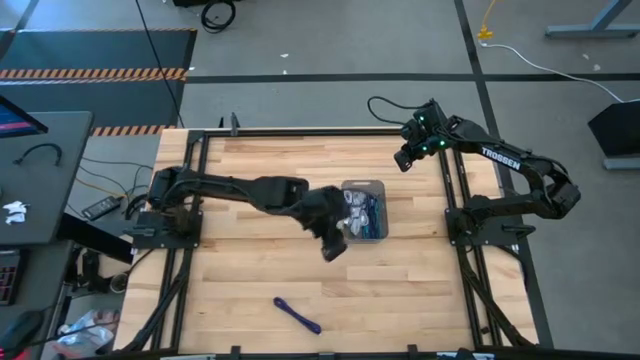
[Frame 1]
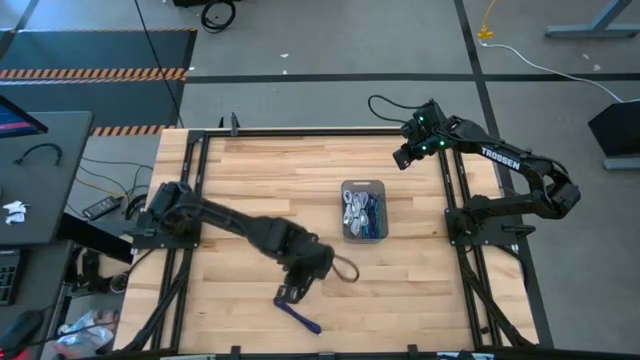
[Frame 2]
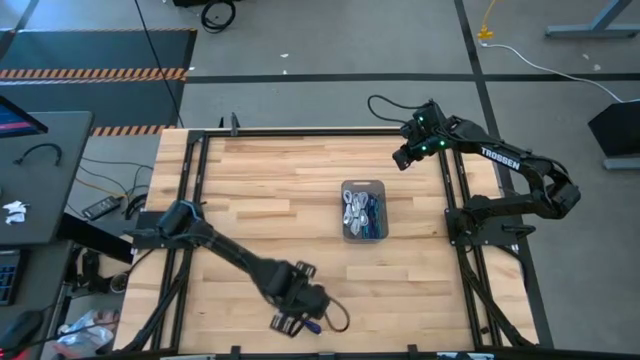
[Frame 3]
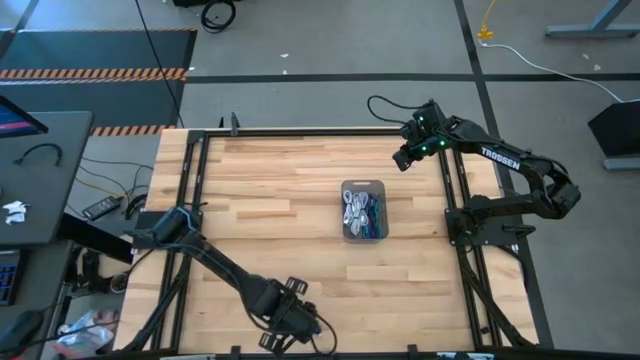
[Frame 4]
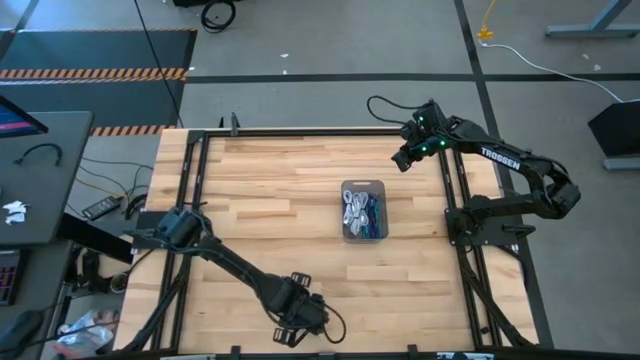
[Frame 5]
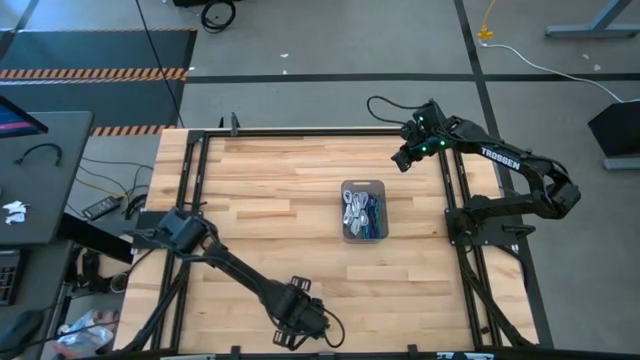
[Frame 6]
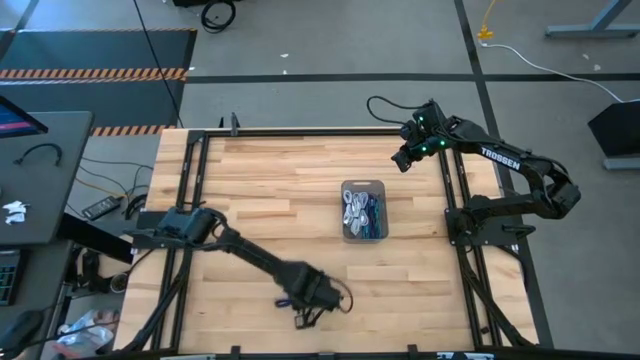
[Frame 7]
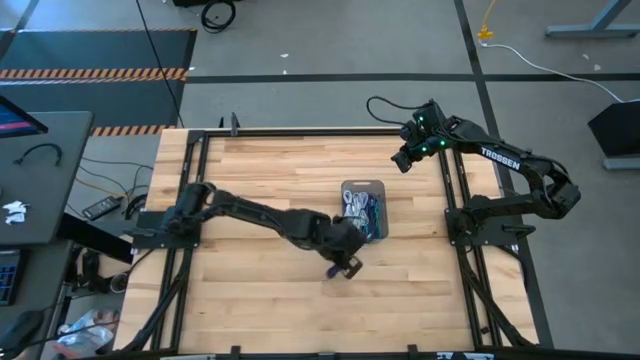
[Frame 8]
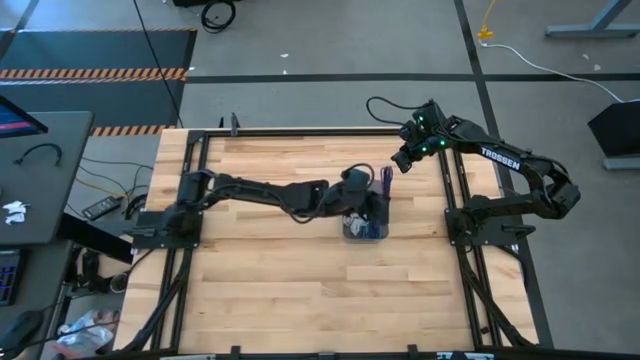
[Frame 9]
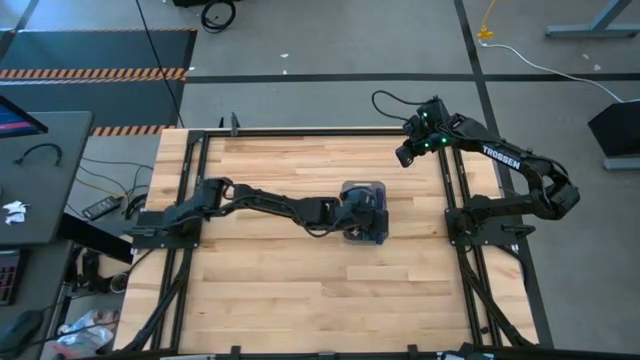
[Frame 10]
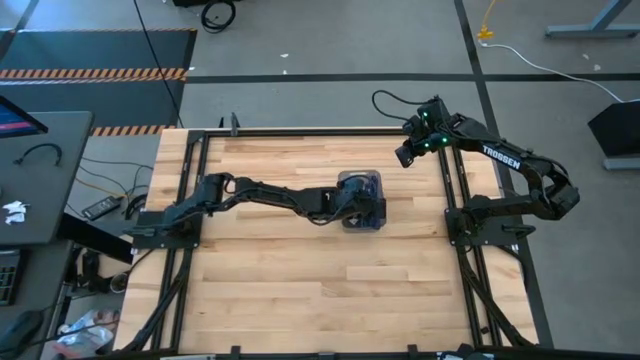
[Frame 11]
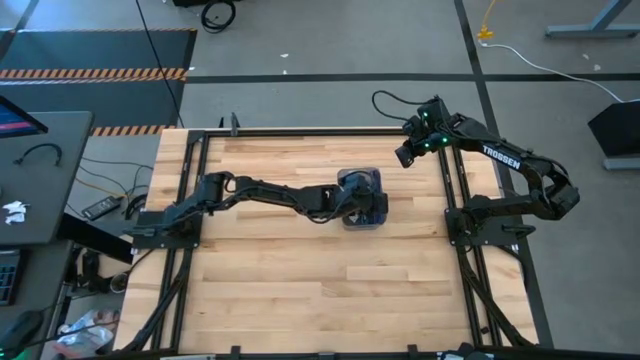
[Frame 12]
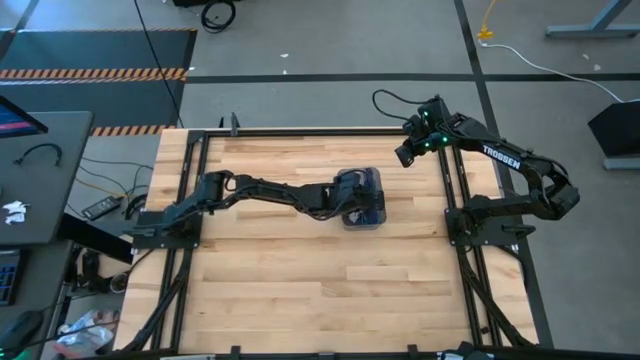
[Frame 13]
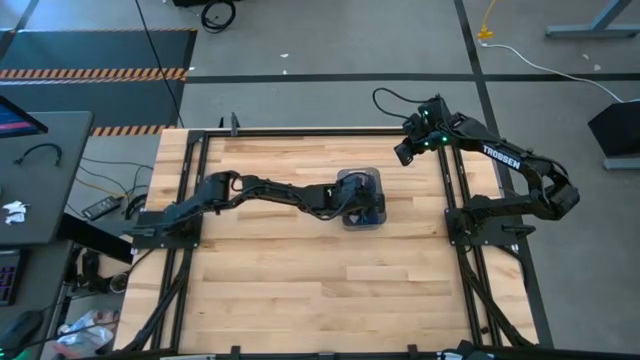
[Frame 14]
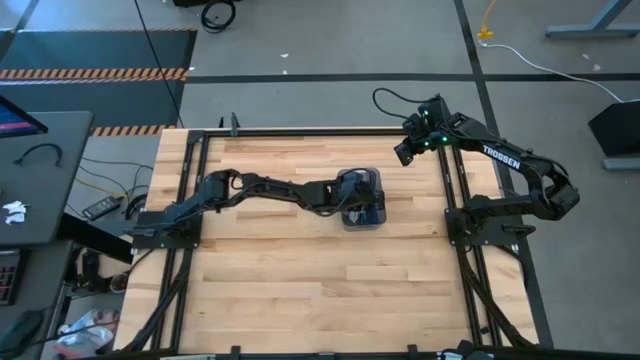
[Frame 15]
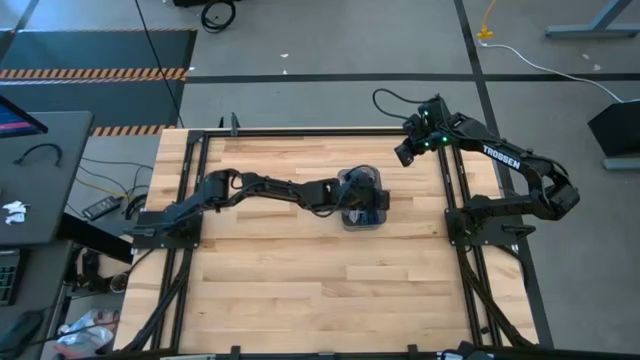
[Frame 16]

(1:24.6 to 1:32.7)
Task: Pick and place USB-C Cables
Put the purple charger cable into the gray bin

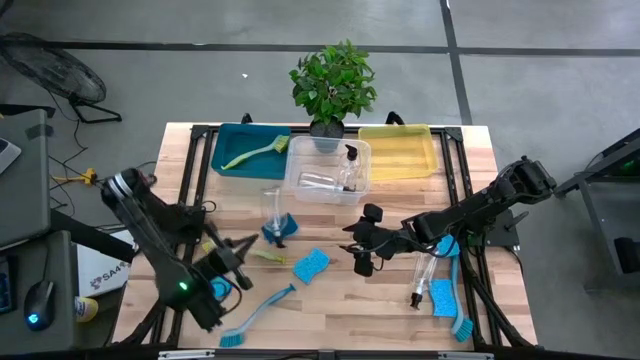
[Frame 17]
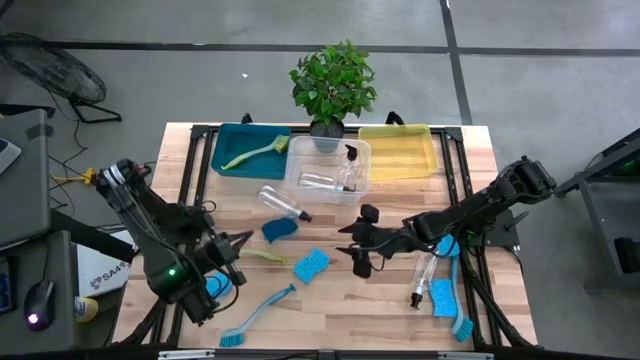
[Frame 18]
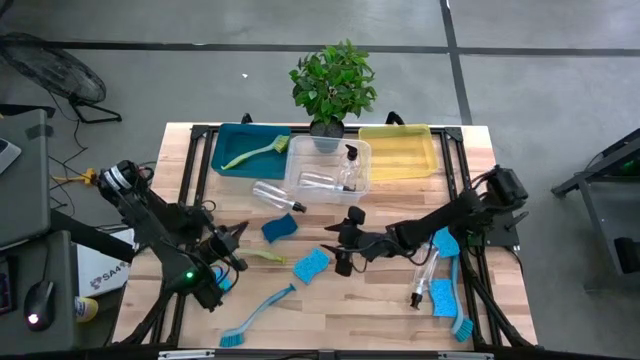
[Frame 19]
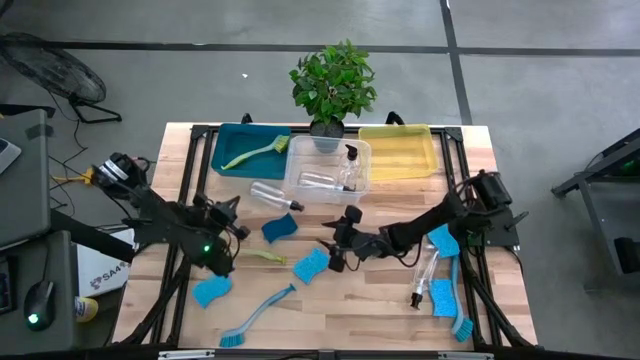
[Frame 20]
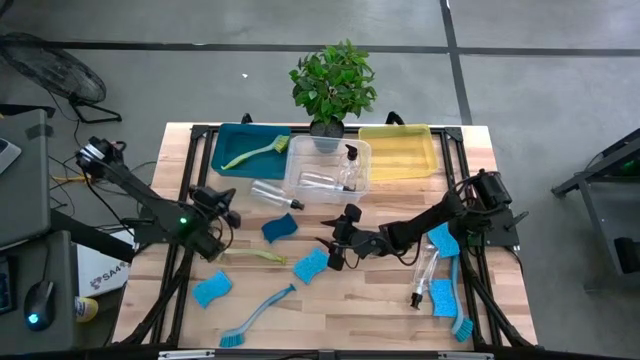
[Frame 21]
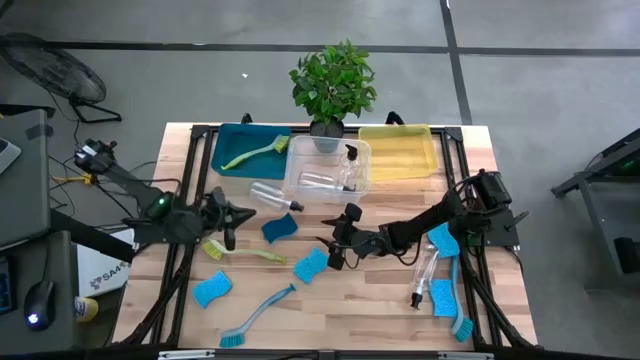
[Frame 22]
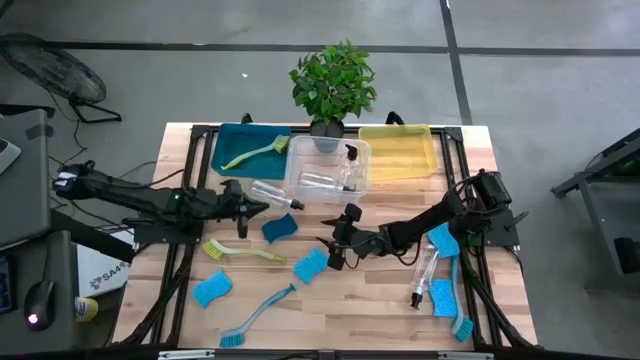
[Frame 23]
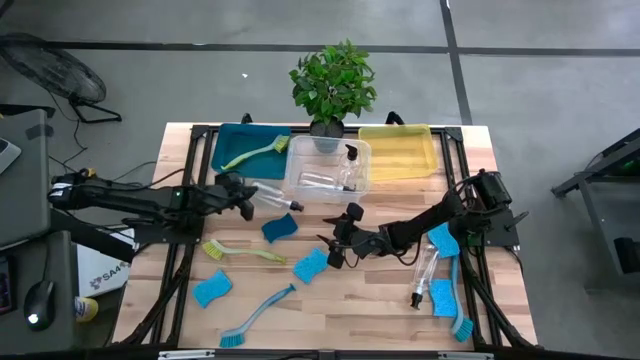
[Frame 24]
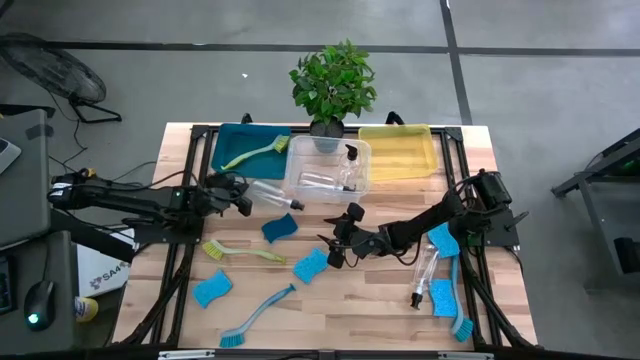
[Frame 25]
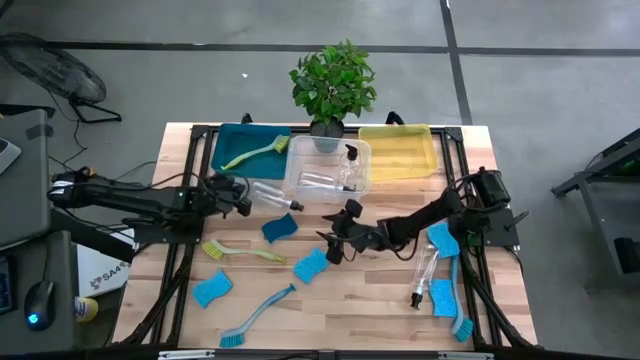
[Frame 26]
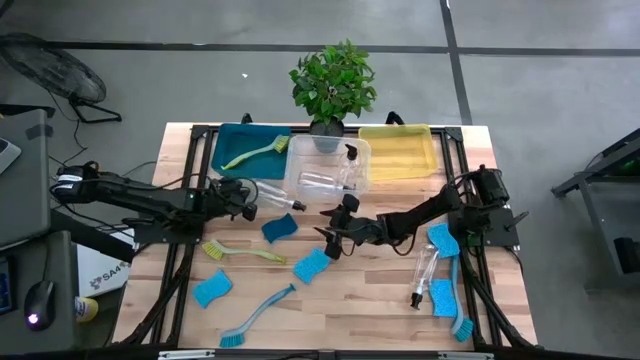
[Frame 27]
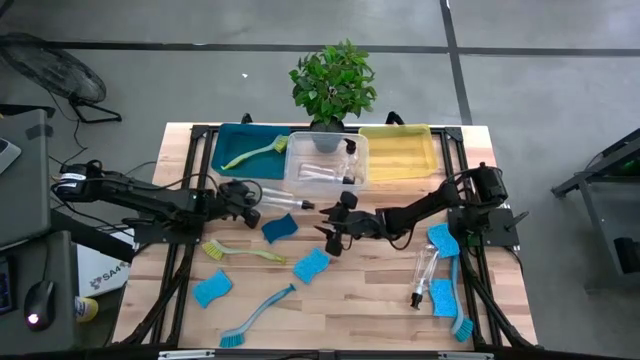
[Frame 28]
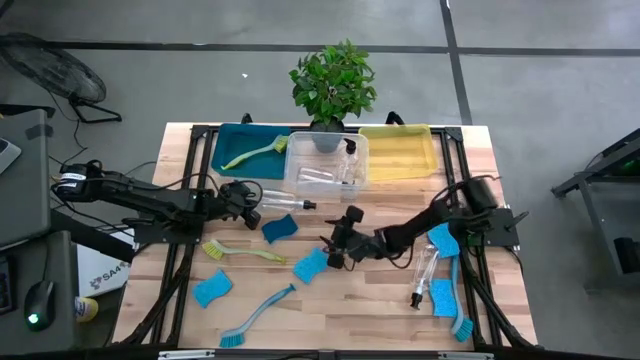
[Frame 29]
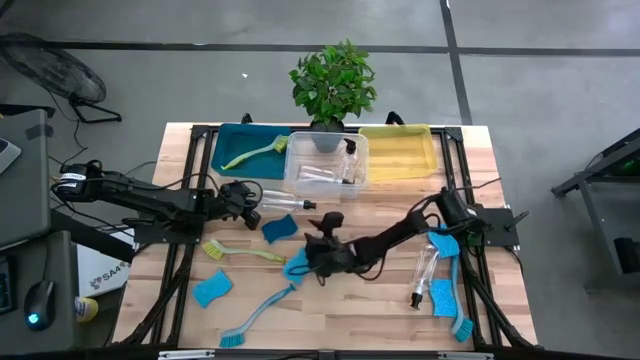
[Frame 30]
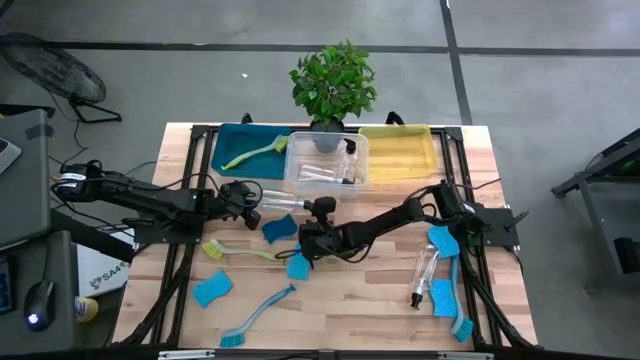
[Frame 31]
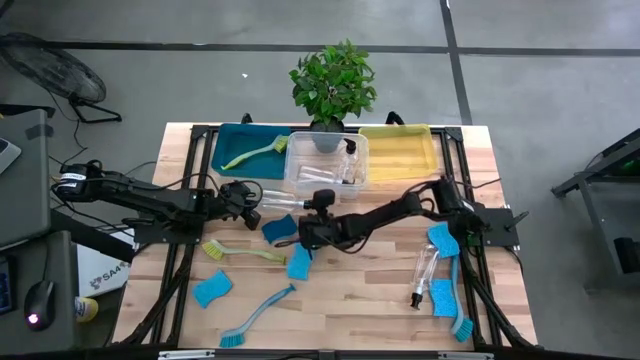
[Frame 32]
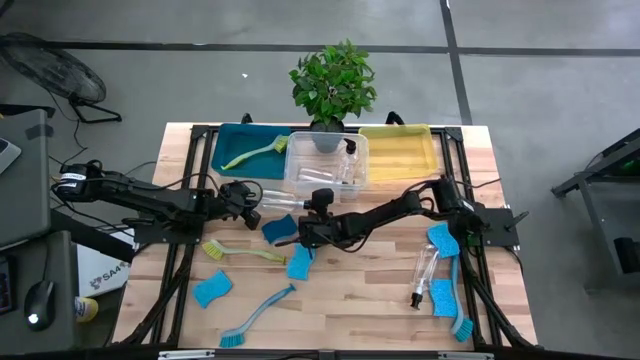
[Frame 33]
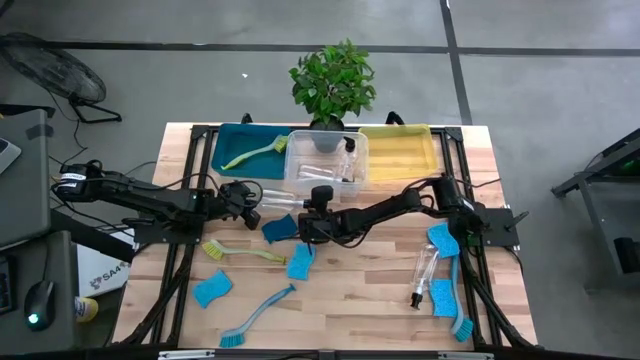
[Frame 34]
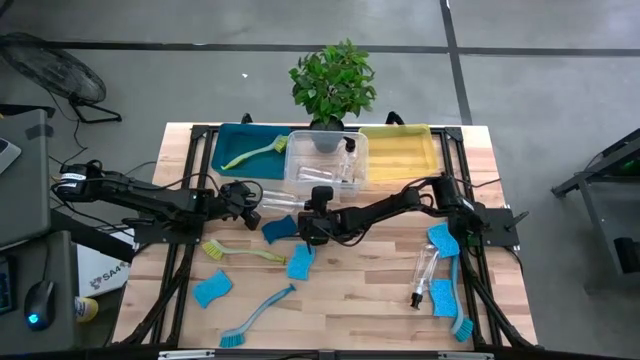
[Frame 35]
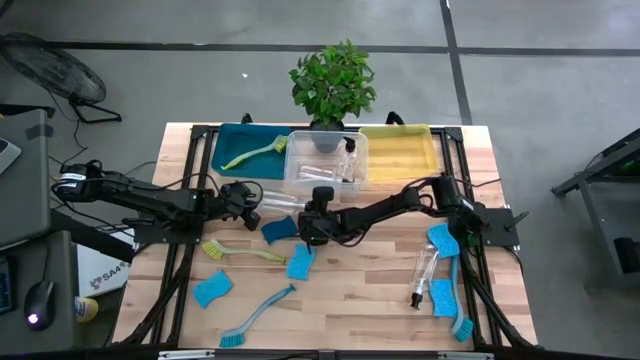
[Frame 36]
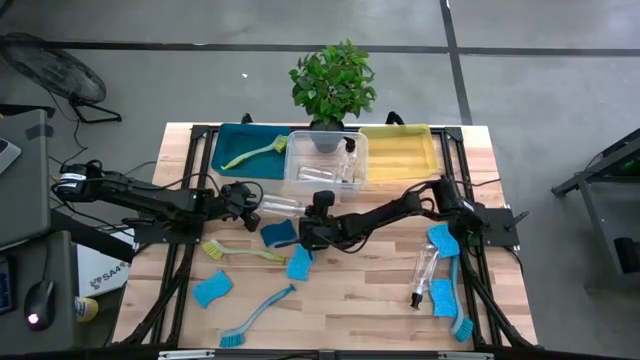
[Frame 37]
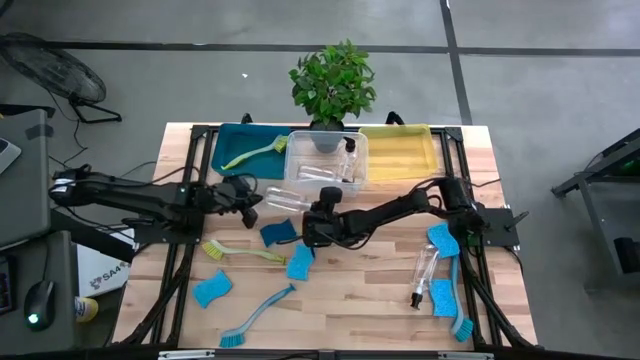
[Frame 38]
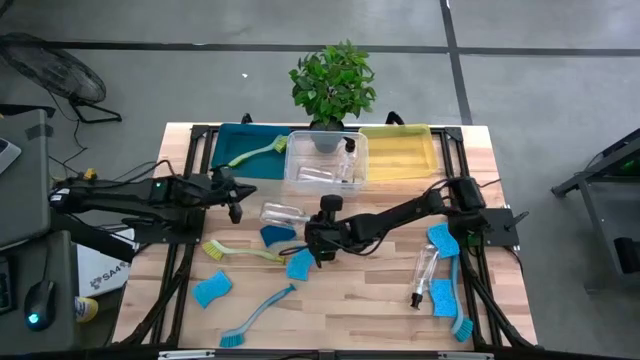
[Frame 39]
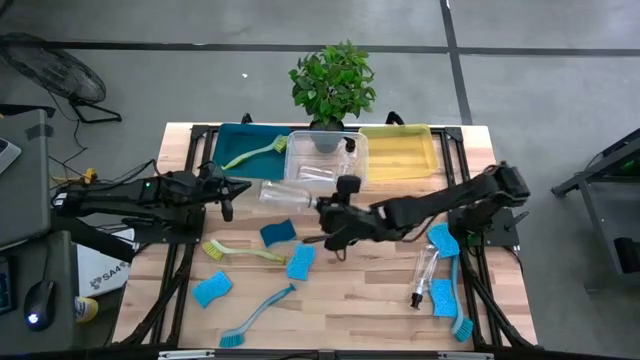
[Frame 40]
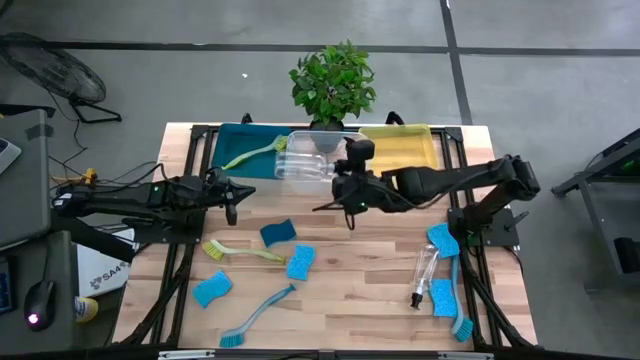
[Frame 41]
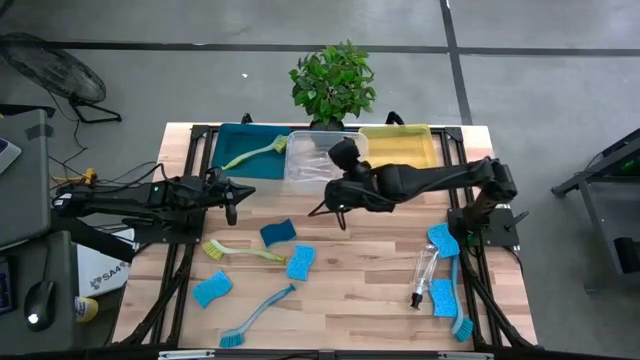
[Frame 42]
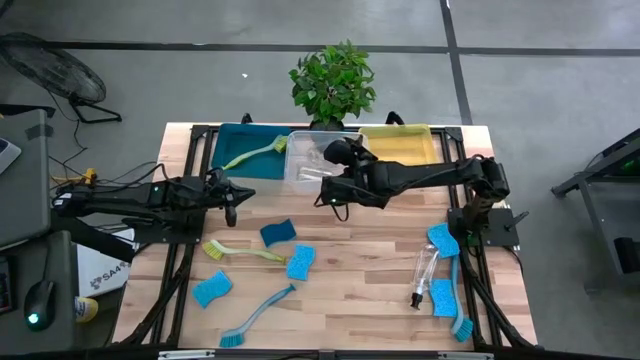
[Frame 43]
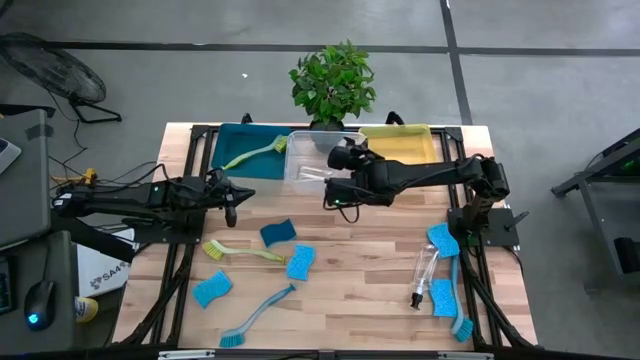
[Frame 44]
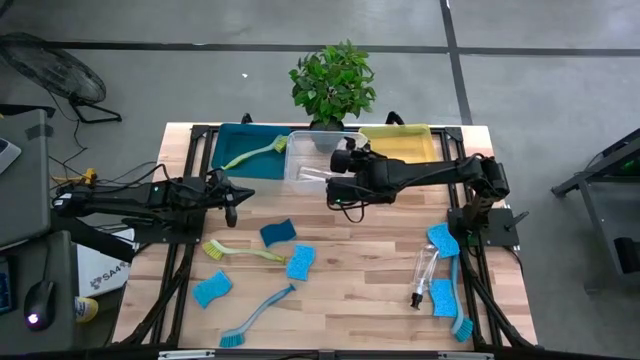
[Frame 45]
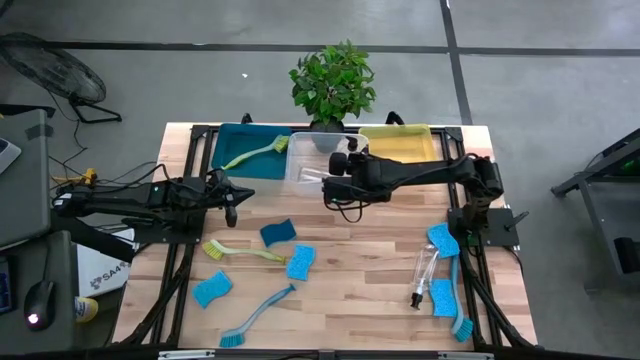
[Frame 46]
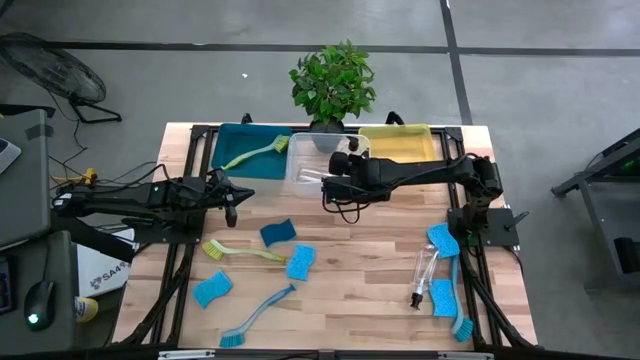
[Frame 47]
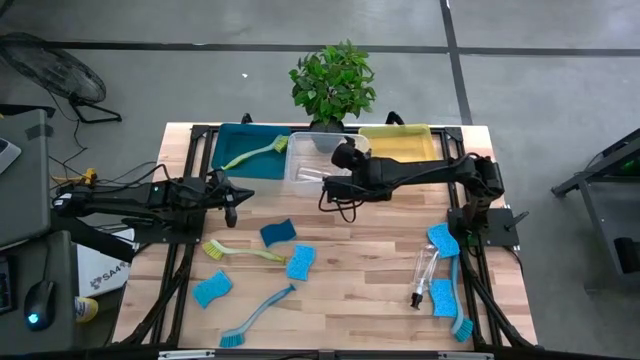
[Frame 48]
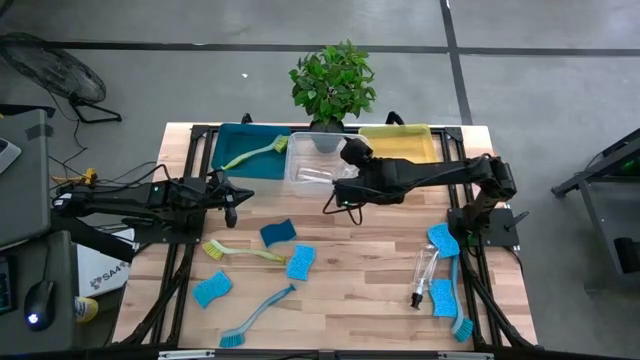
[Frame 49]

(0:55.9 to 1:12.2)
Task: Pick & Place Kitchen Sink Supplies
Put the transparent soap dispenser into the transparent bin
